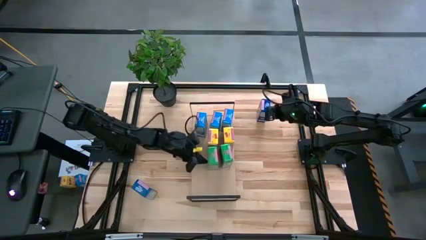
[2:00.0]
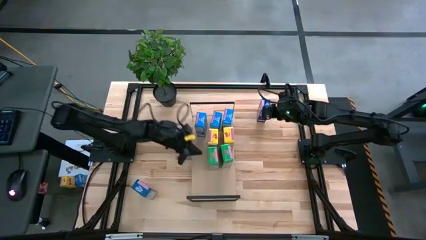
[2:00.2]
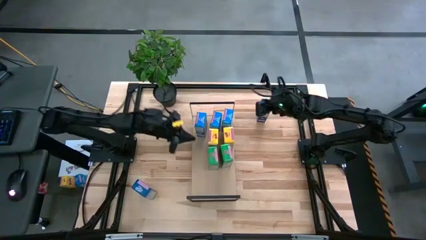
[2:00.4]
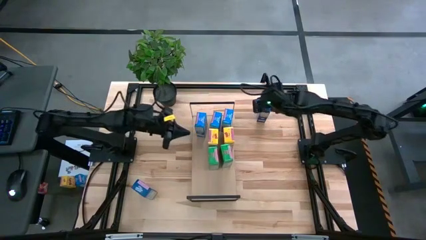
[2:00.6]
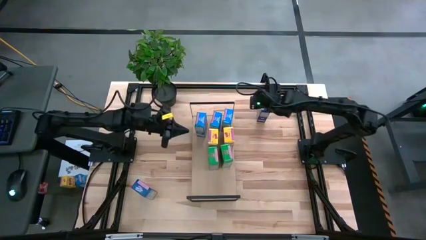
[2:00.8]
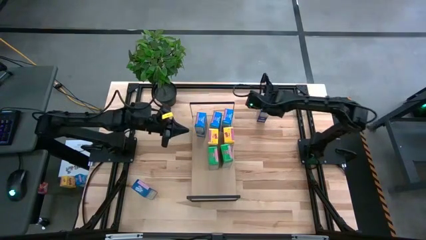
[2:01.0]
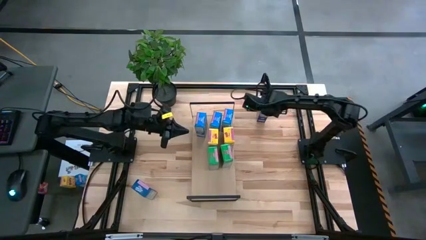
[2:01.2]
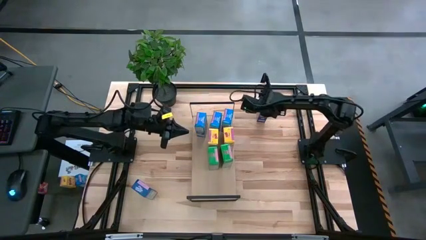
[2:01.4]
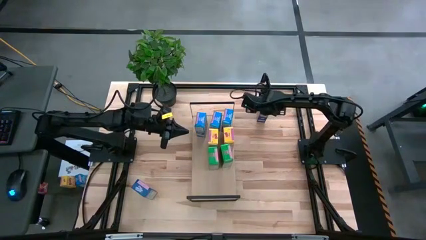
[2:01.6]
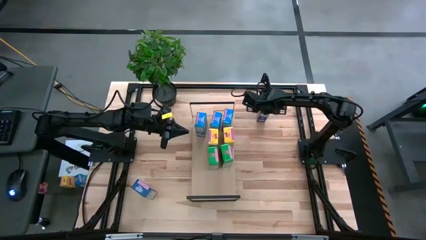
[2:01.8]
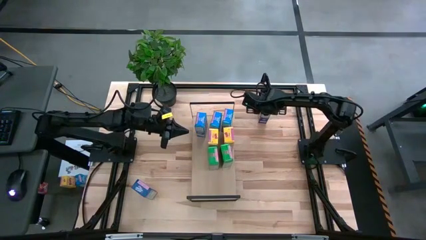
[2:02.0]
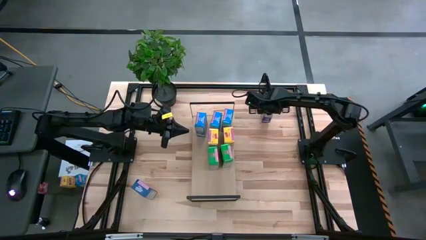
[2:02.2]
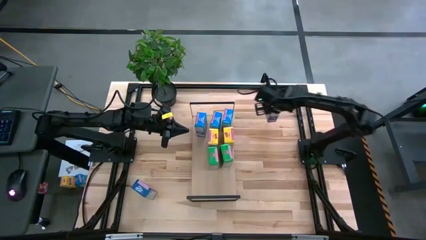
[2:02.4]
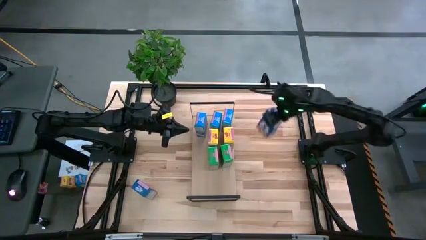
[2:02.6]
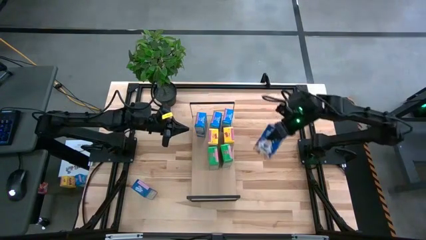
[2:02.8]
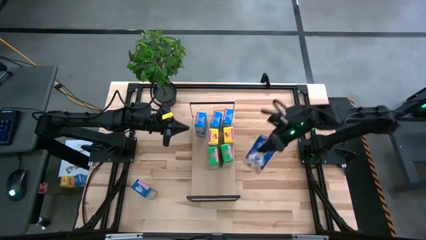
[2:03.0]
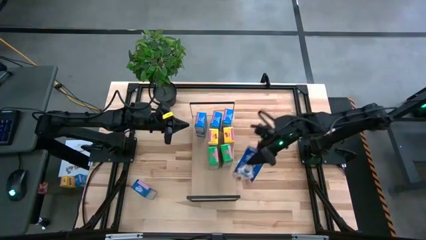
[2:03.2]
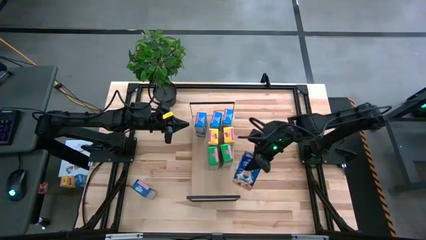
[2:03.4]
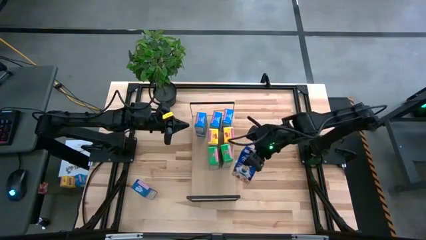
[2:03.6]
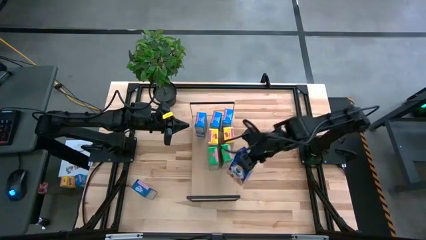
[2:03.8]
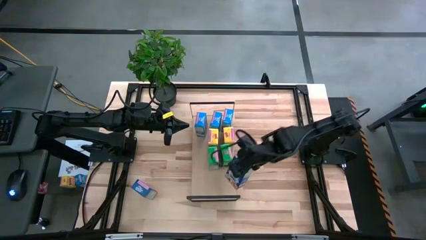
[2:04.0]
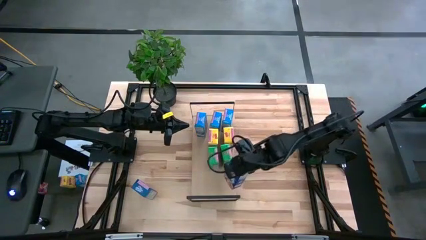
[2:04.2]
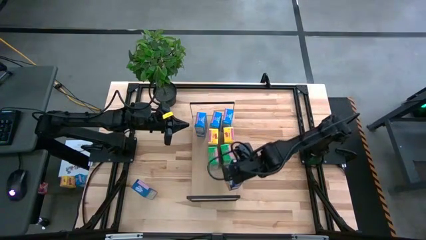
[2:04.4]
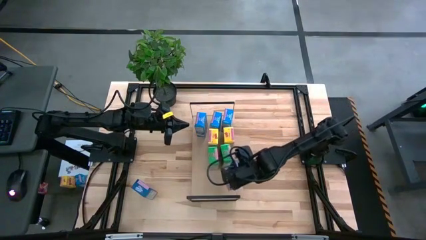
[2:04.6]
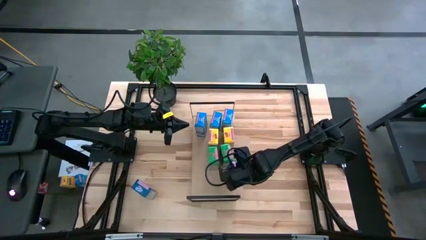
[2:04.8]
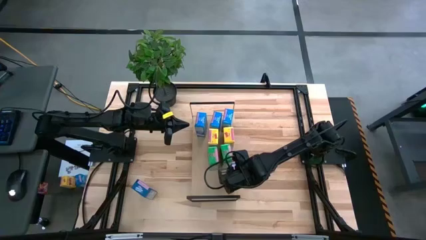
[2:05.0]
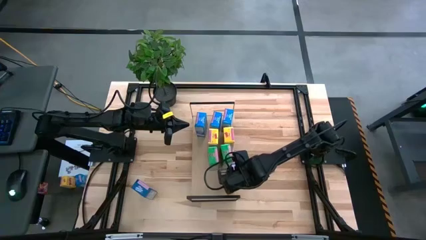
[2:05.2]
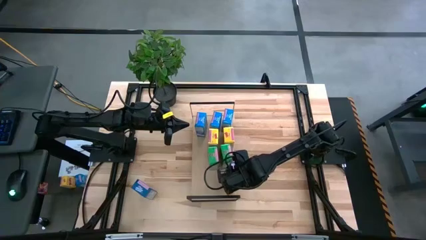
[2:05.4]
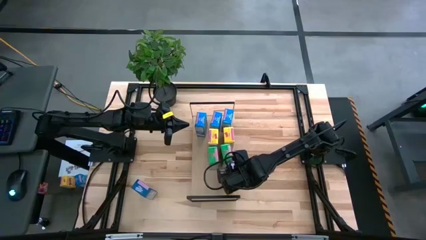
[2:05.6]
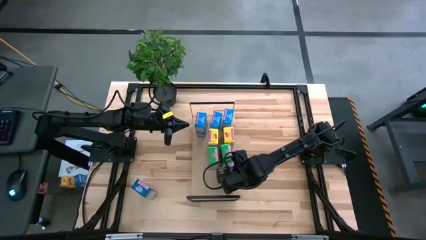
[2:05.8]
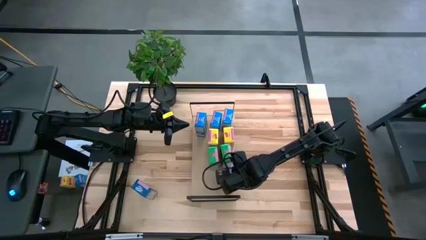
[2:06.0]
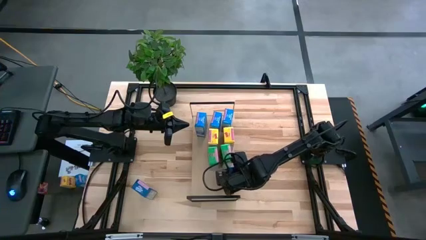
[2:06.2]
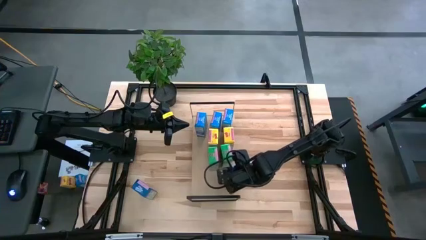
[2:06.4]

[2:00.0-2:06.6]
Task: Stack cereal on shelf
Put the top blue cereal box on the shelf

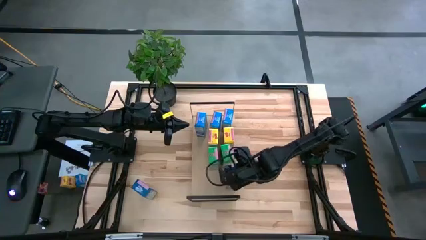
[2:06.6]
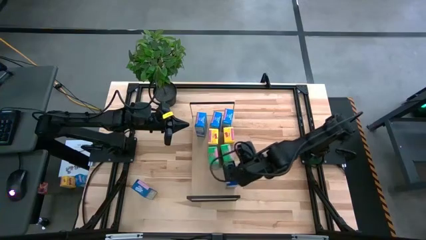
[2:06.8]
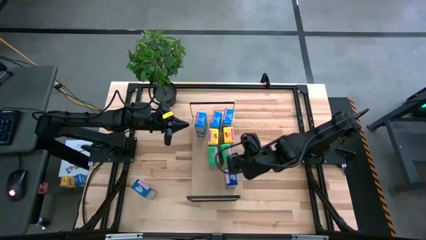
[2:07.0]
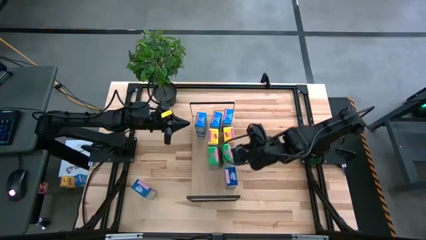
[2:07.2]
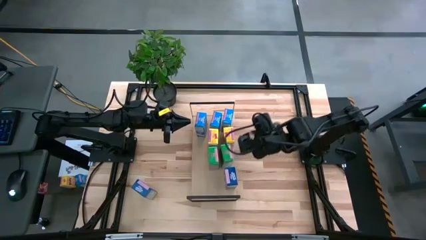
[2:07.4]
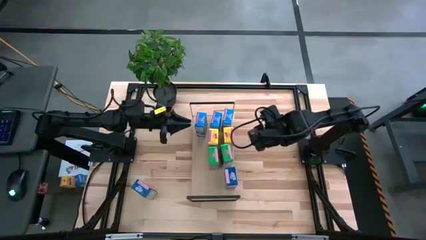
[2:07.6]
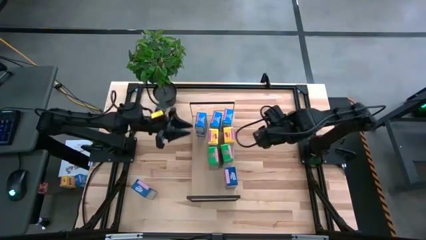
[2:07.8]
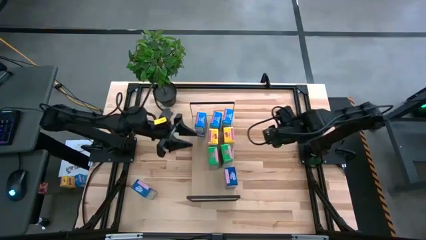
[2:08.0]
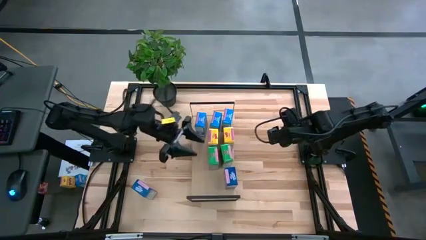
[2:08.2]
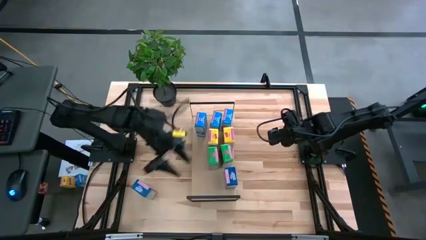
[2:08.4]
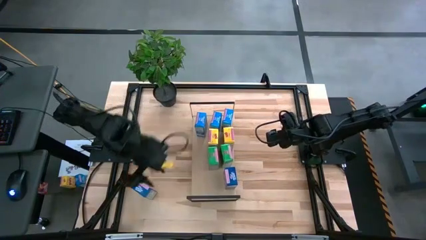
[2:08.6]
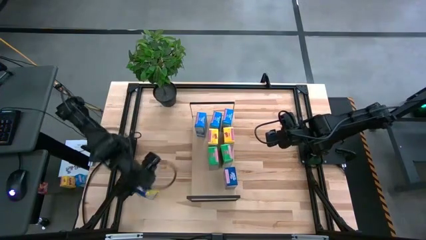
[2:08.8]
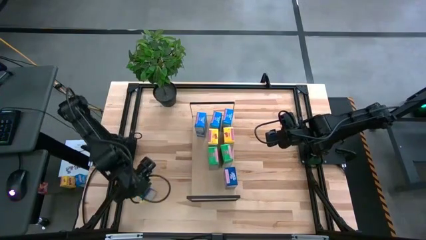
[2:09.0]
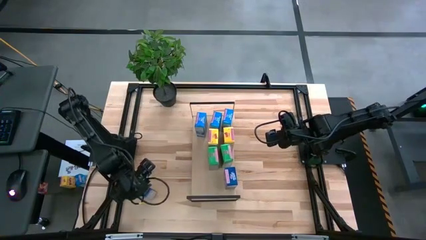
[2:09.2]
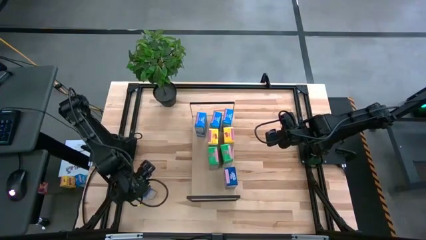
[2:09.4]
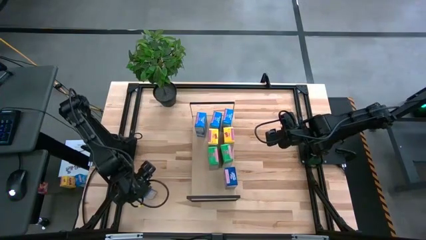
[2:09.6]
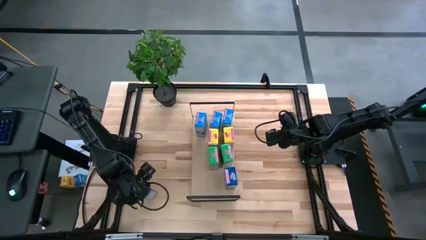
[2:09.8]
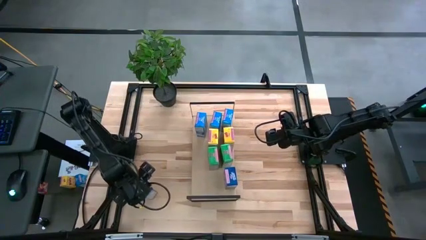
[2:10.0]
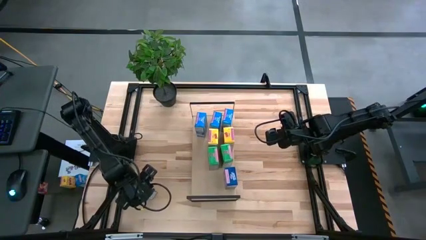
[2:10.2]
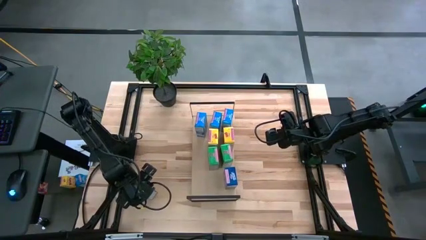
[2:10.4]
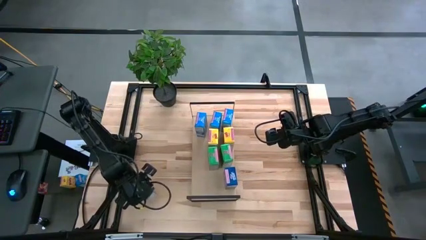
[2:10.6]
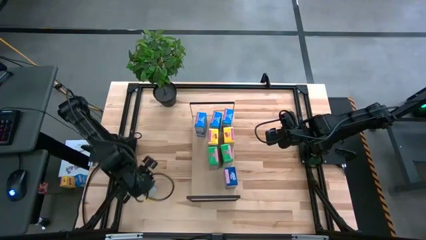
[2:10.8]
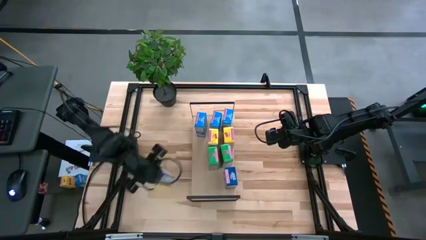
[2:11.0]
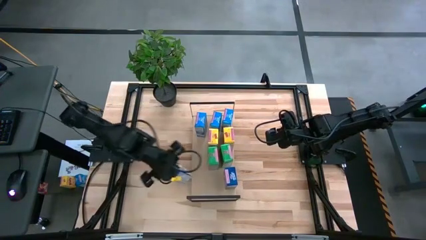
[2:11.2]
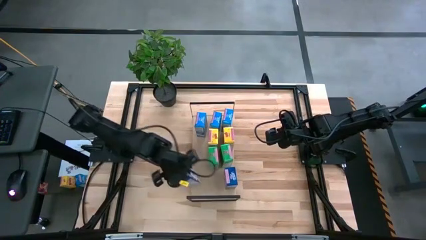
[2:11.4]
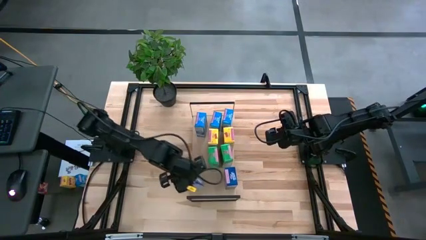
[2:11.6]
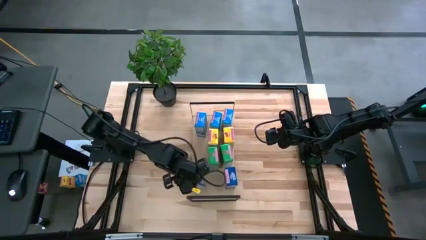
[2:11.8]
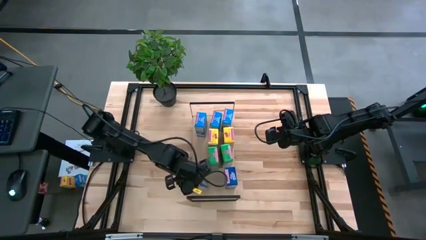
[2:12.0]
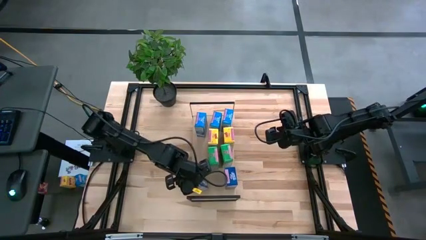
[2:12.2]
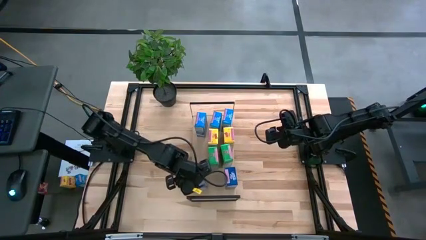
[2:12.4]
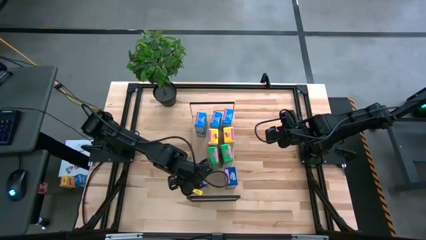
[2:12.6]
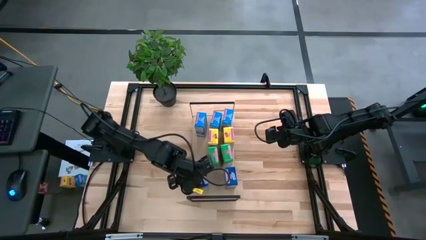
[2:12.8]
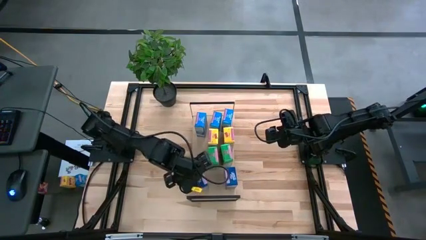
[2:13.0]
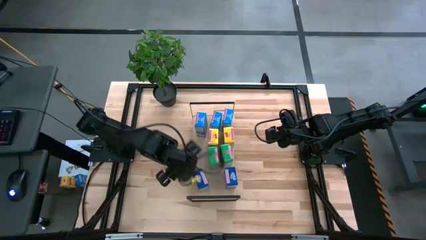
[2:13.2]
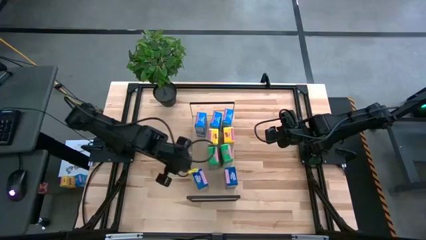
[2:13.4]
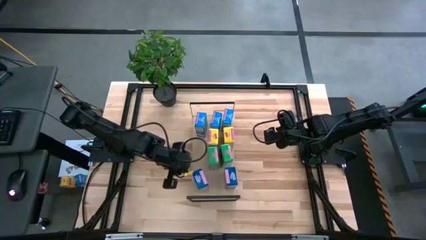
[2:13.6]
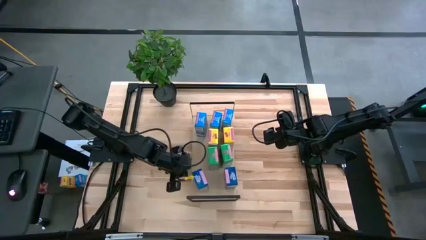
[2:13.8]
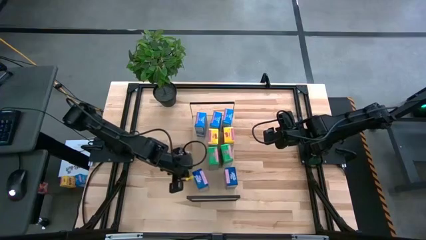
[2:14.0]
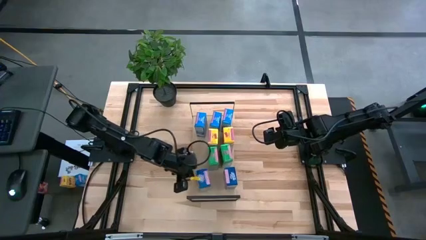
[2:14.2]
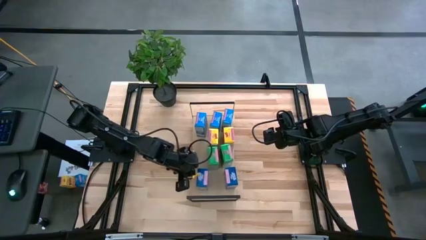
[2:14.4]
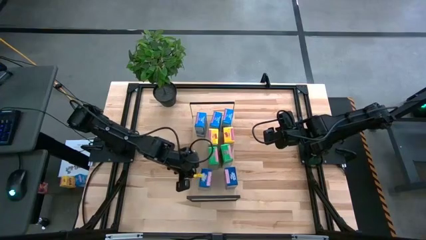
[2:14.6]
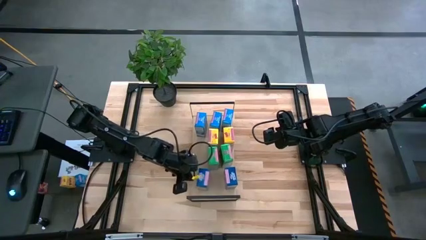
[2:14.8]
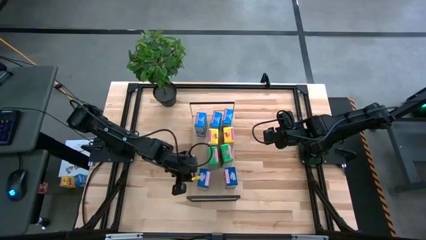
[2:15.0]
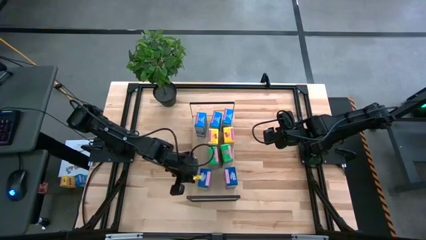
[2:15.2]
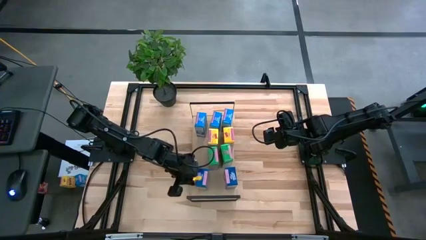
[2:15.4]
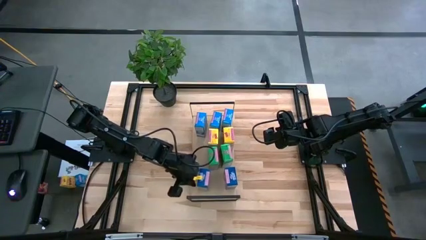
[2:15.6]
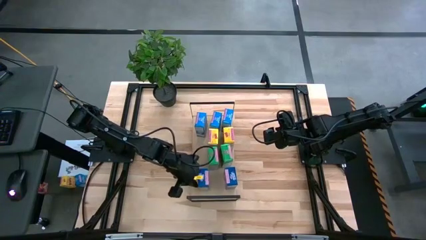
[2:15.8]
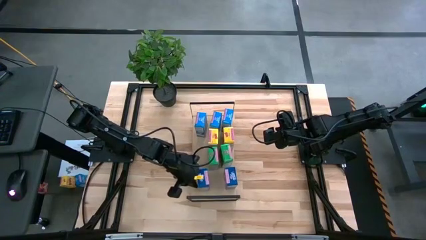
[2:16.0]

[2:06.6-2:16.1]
Put the blue cereal box on the shelf aligned with the other blue cereal box
